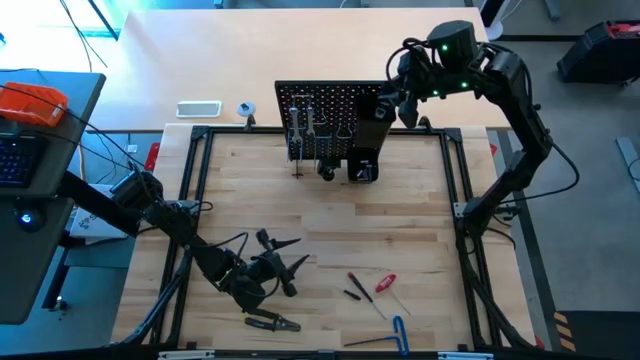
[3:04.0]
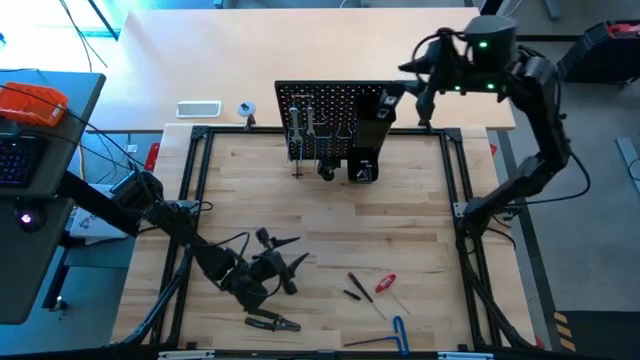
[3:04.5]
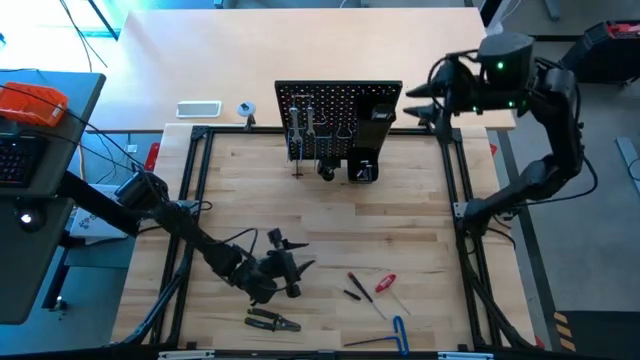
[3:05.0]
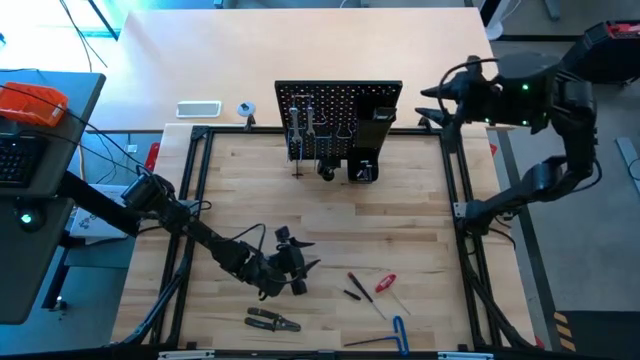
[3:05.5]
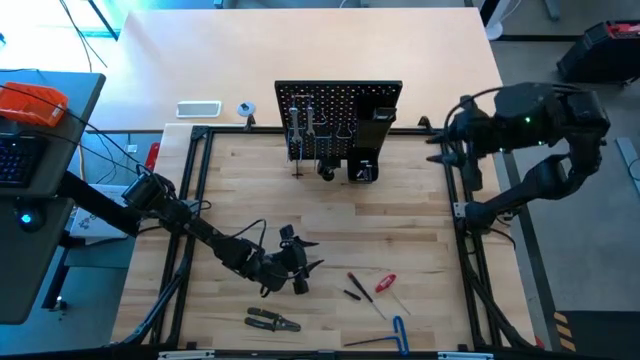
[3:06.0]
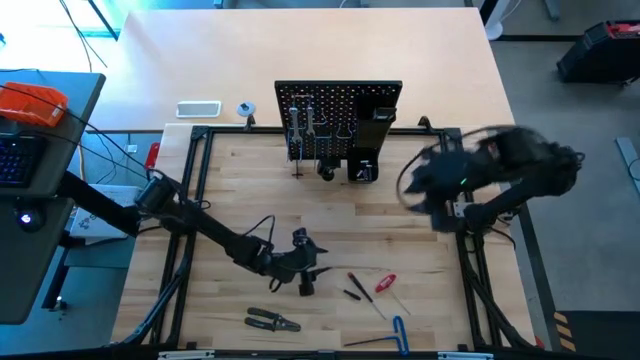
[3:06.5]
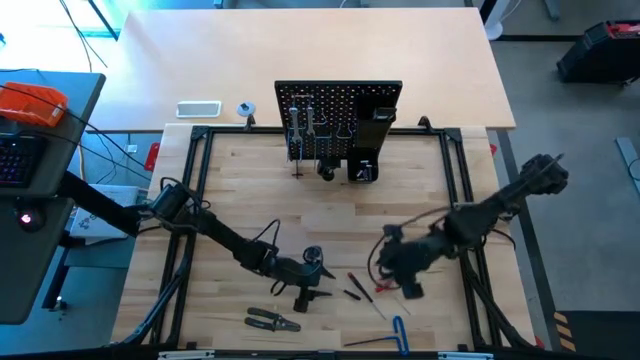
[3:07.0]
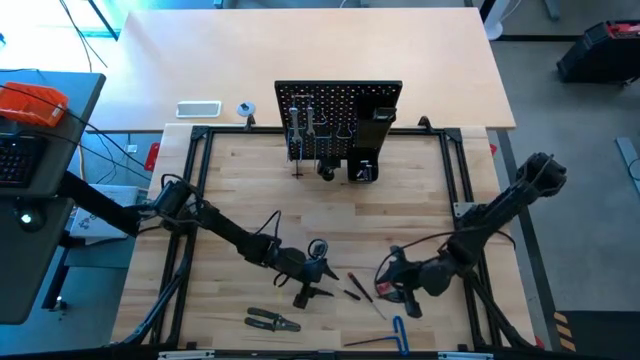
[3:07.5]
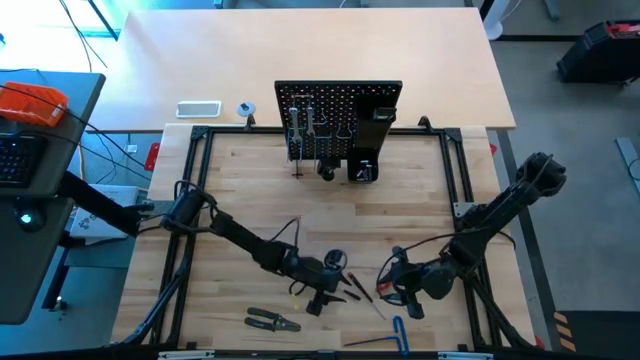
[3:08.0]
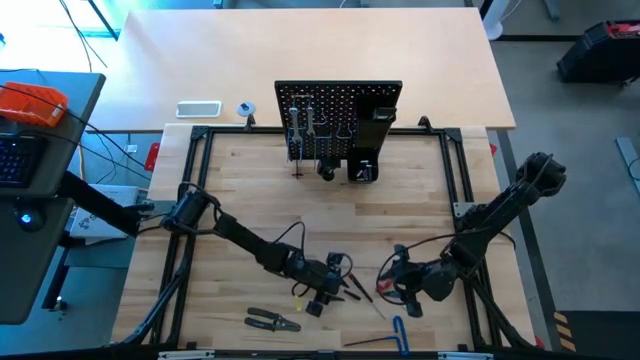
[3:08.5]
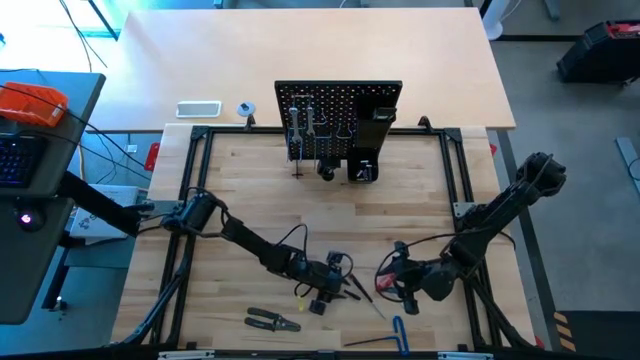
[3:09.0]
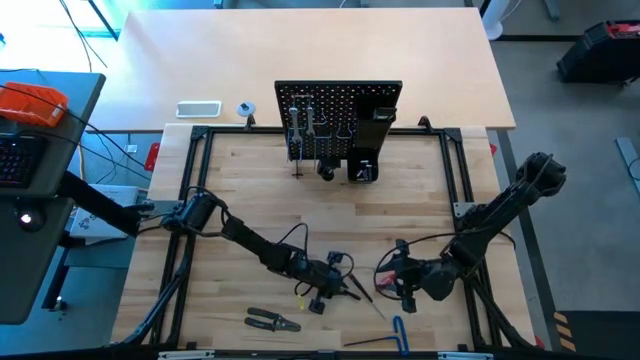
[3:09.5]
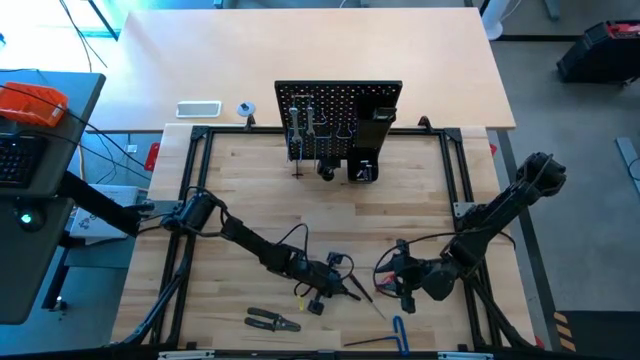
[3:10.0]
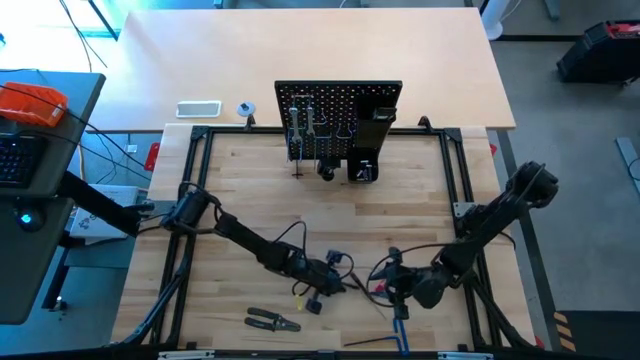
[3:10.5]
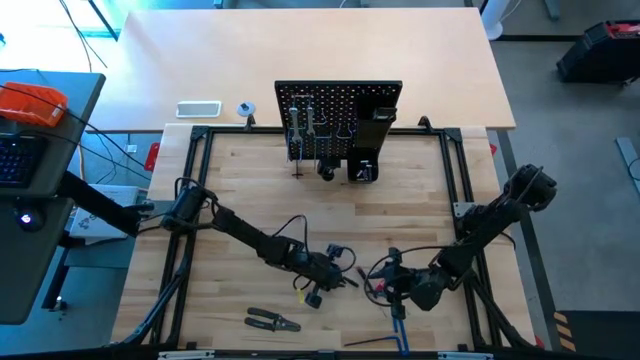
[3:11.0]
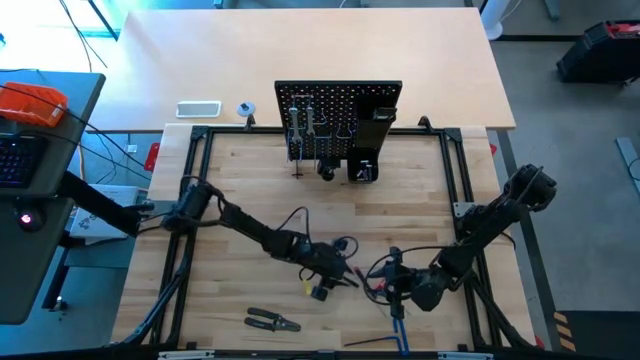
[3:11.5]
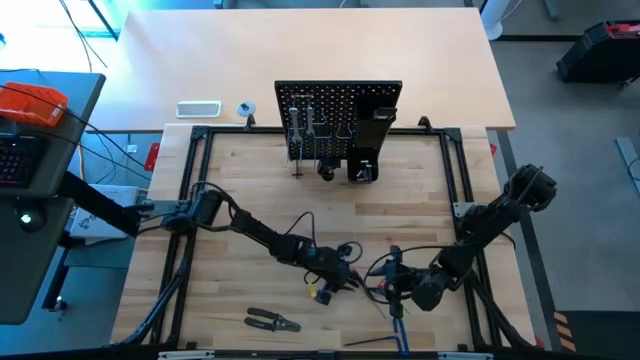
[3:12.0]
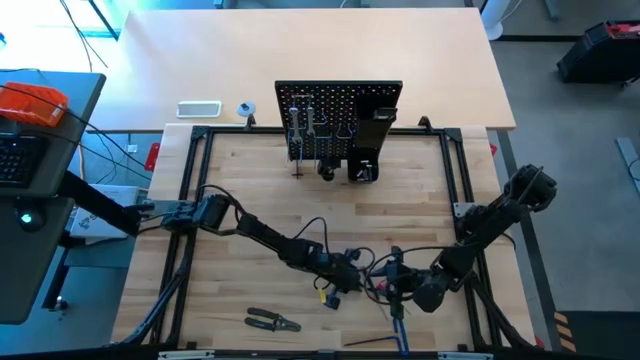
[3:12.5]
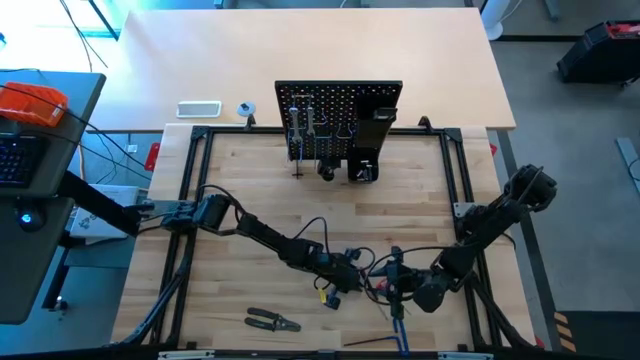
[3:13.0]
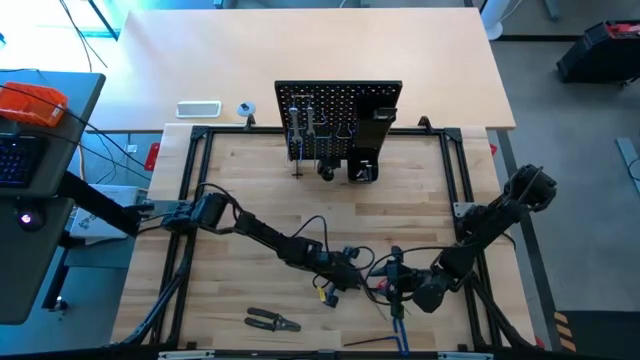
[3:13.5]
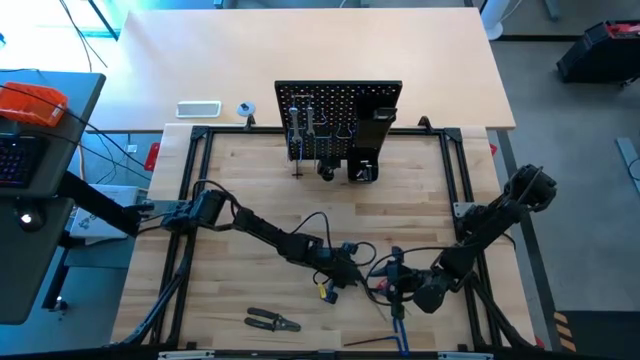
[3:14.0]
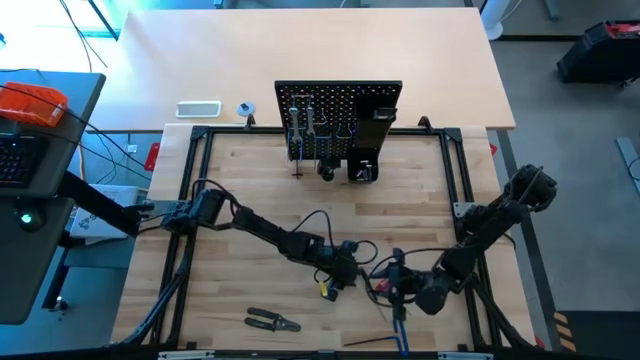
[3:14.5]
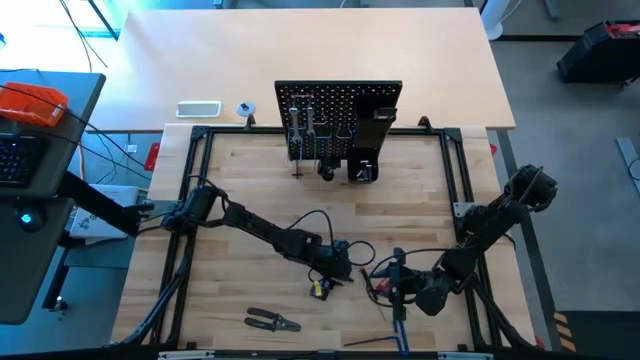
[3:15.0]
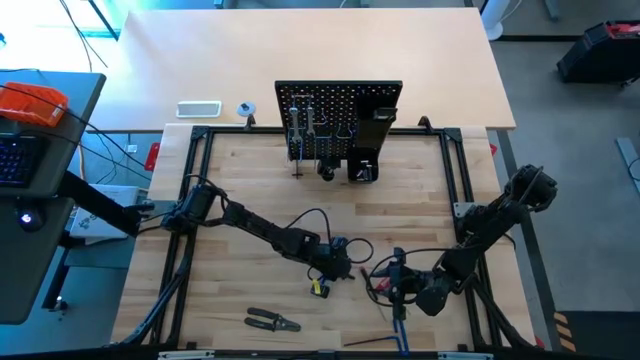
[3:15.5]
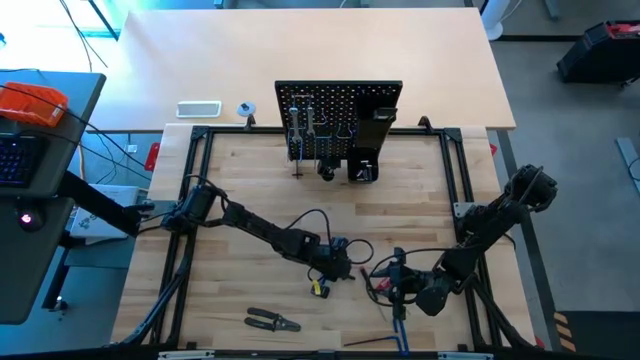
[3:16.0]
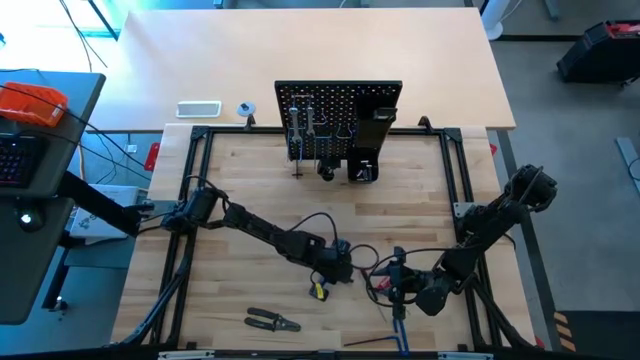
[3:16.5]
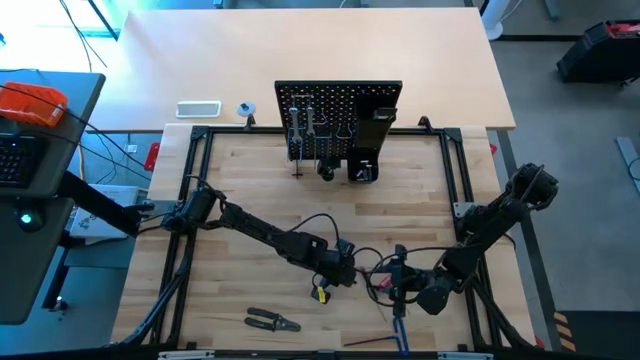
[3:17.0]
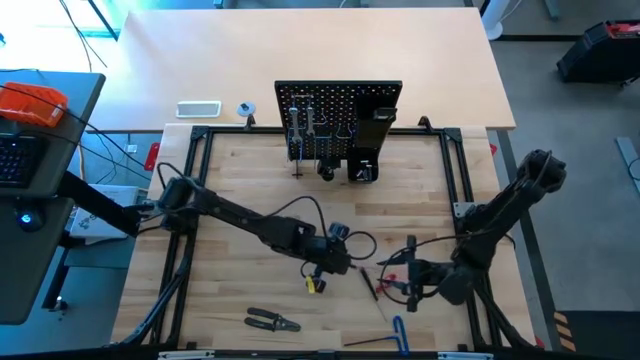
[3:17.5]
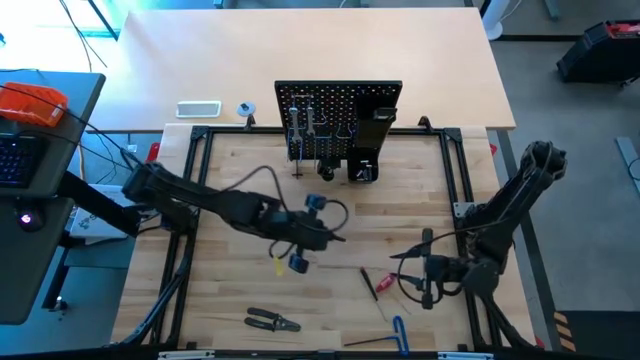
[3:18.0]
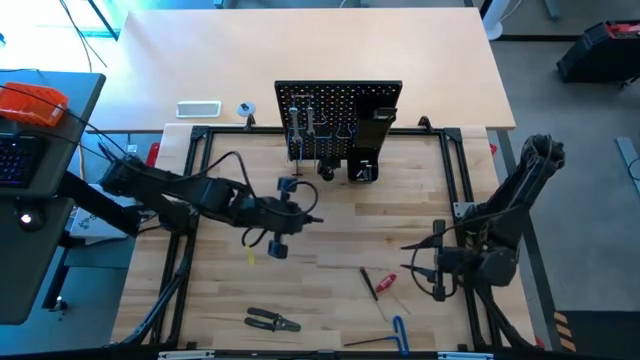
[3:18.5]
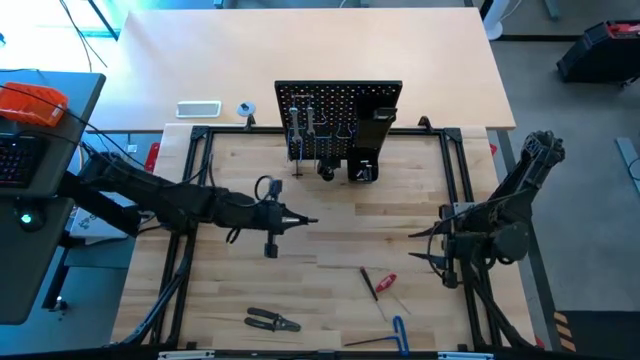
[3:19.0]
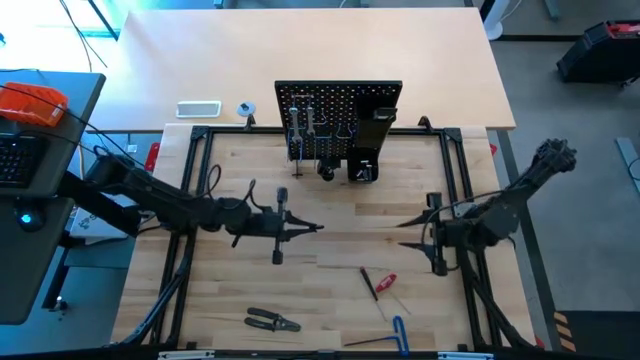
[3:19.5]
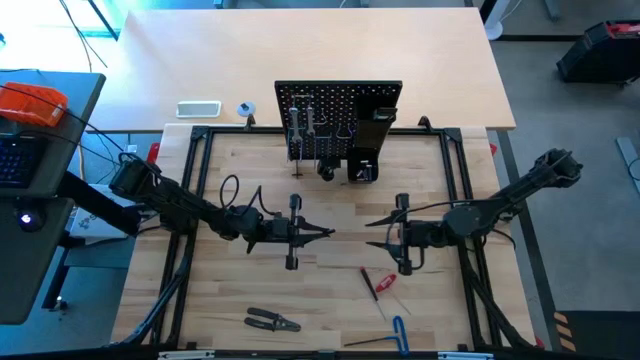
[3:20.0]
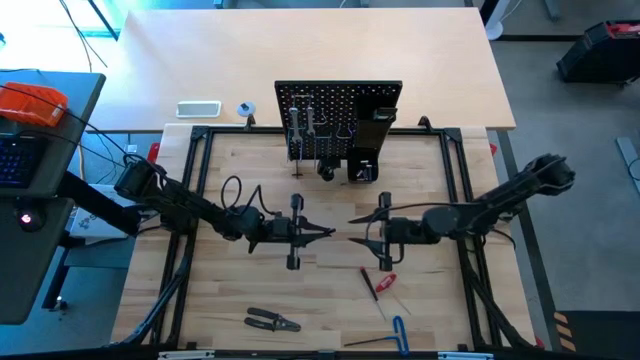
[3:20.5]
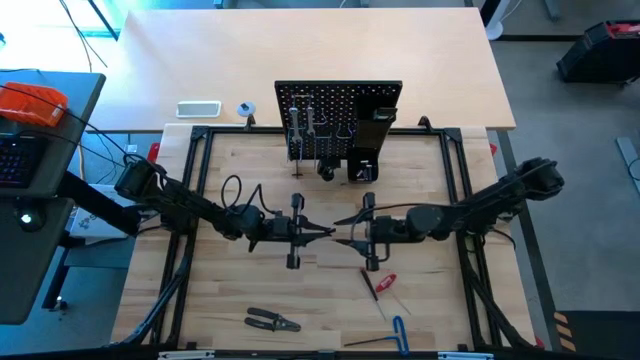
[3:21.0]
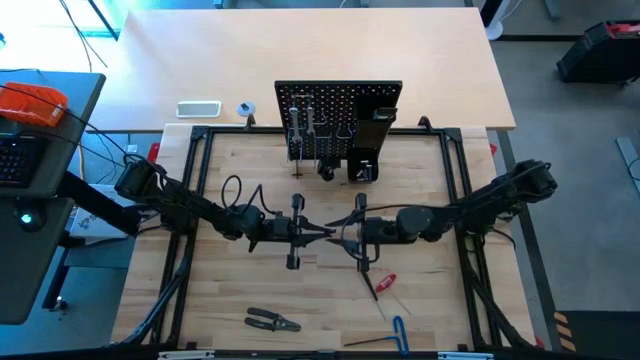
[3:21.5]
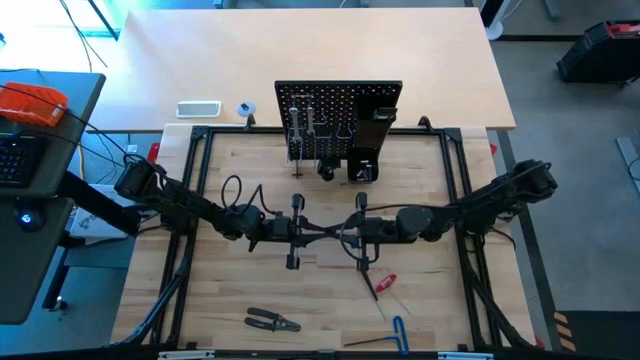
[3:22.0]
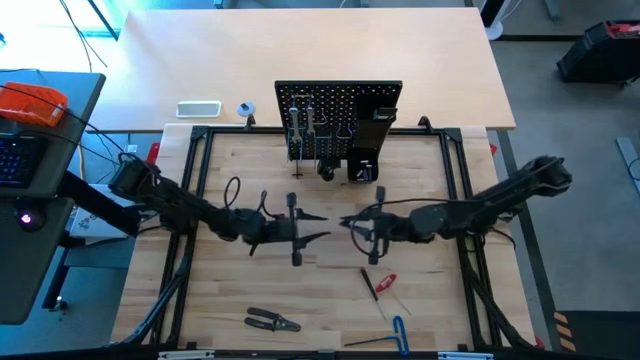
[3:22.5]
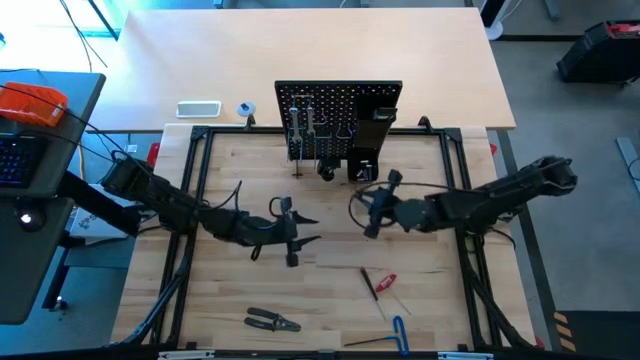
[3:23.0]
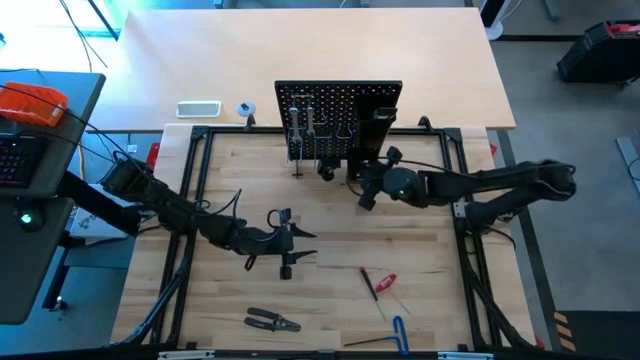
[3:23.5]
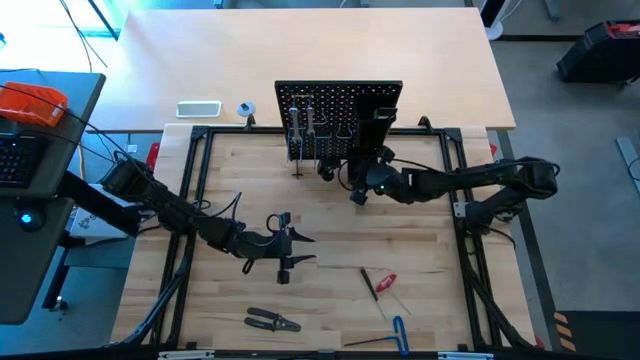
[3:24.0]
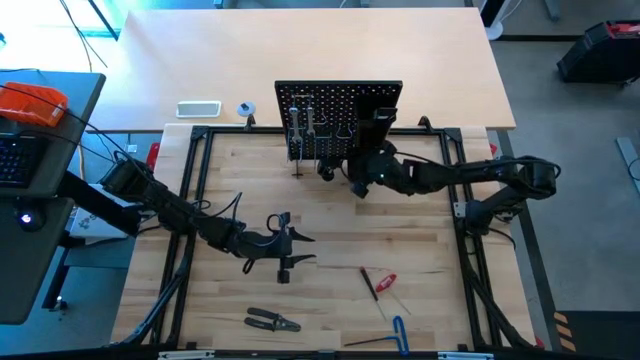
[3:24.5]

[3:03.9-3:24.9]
Task: Hang tools onto peg board
Put the black screwdriver into the bottom peg board bin

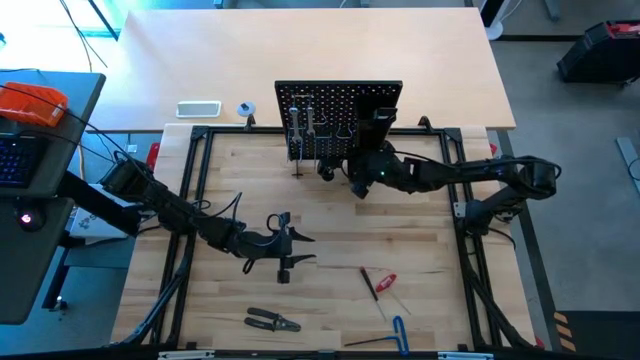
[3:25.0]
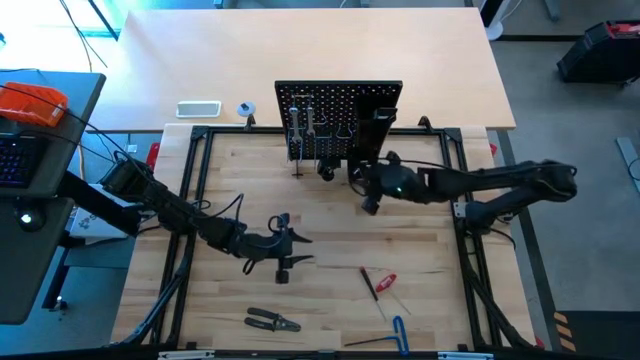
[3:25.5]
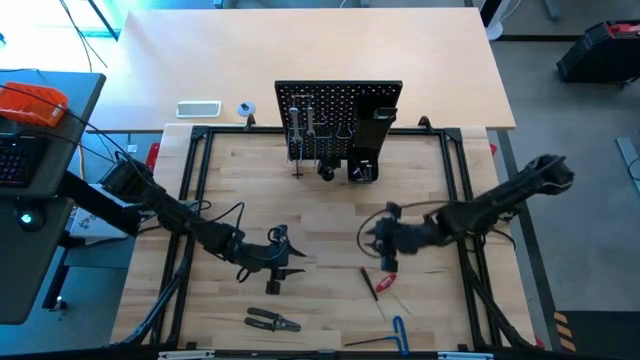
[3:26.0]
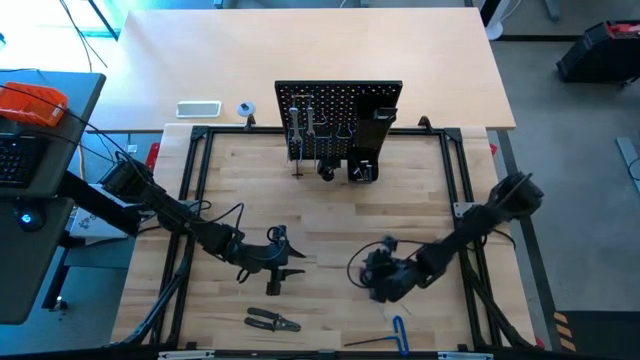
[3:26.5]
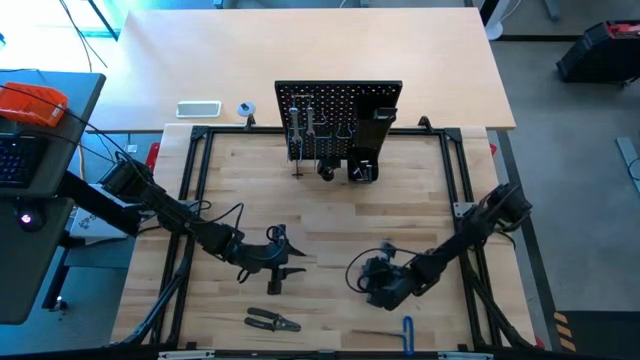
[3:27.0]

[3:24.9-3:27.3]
Put the black nut into the top peg board bin
